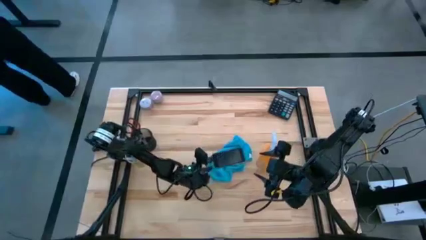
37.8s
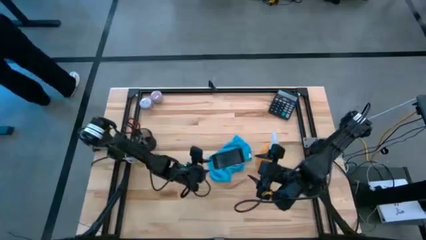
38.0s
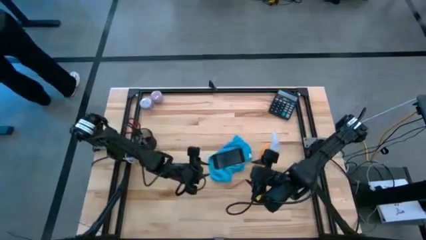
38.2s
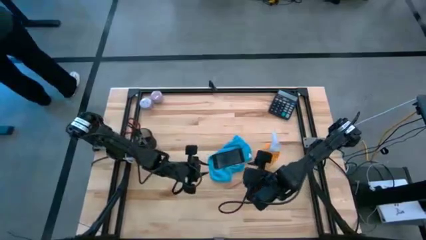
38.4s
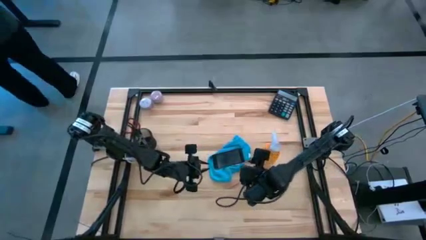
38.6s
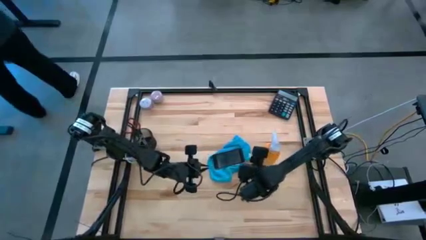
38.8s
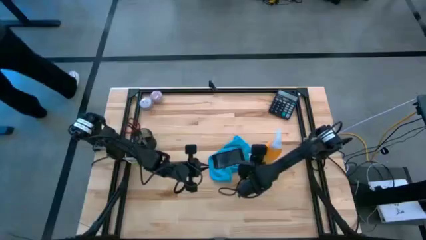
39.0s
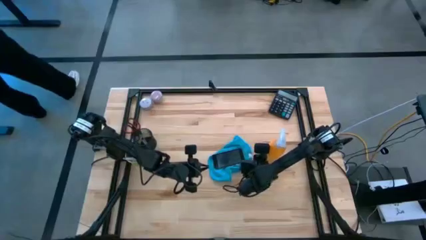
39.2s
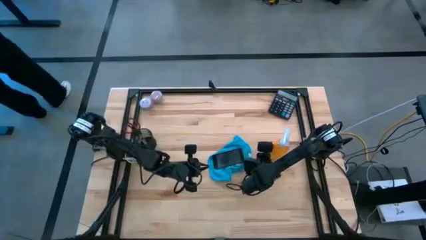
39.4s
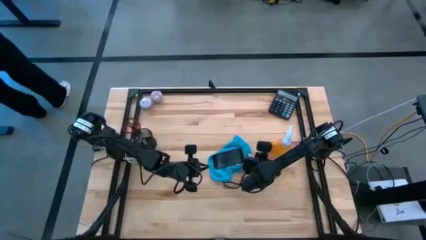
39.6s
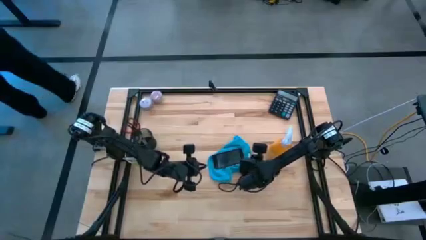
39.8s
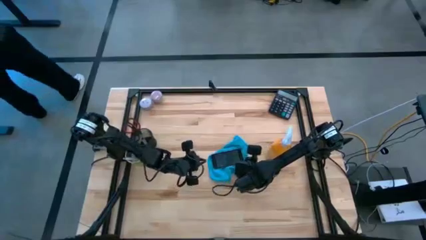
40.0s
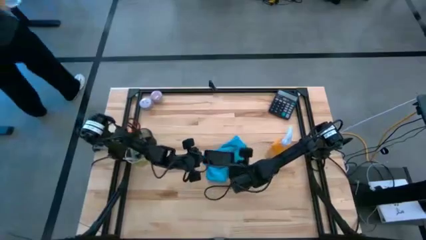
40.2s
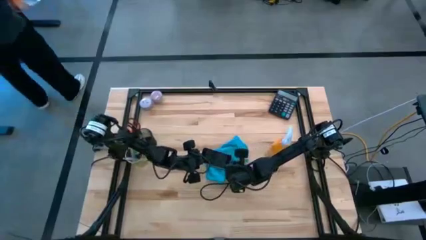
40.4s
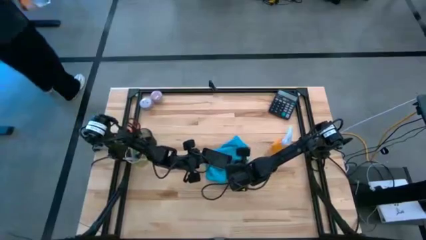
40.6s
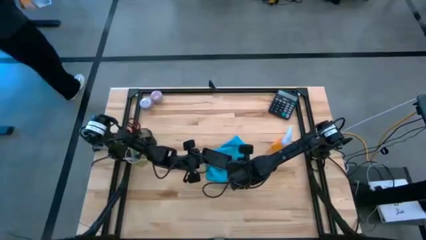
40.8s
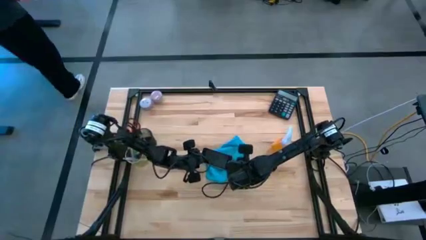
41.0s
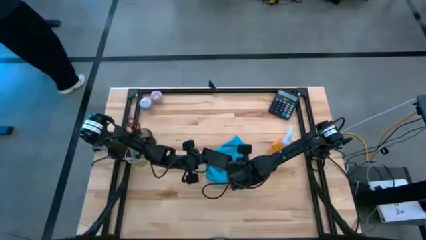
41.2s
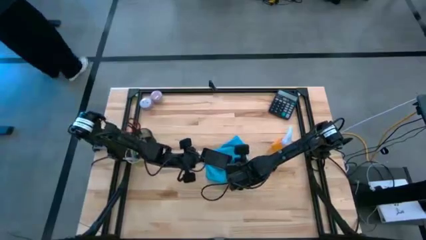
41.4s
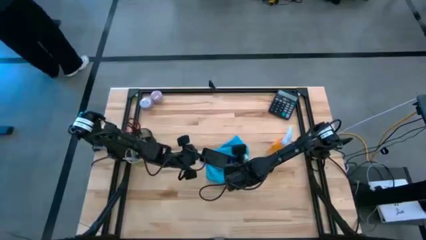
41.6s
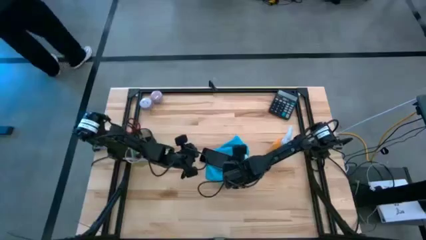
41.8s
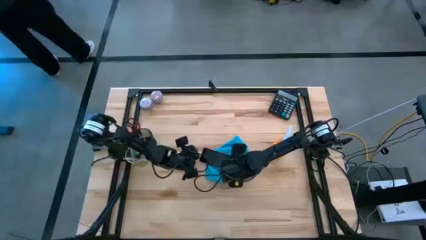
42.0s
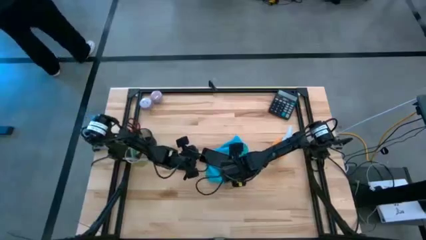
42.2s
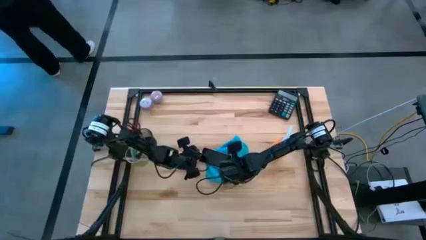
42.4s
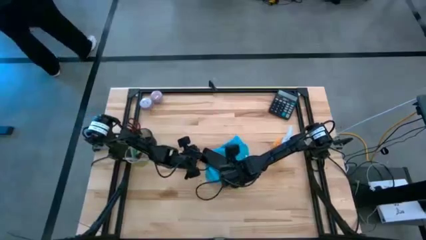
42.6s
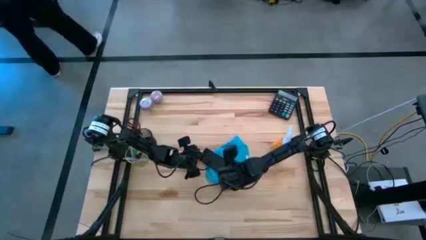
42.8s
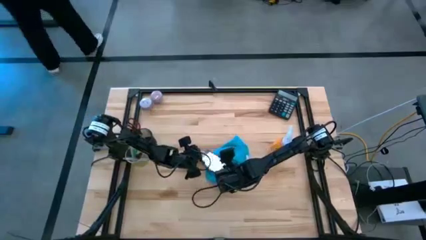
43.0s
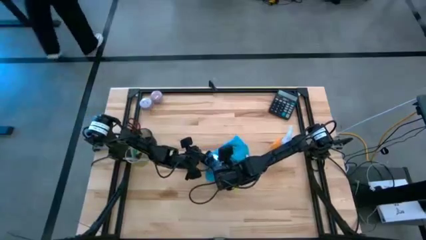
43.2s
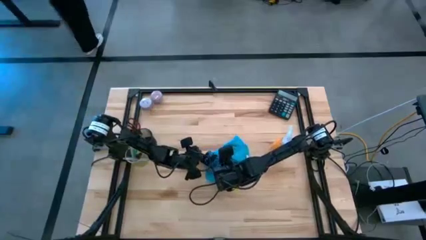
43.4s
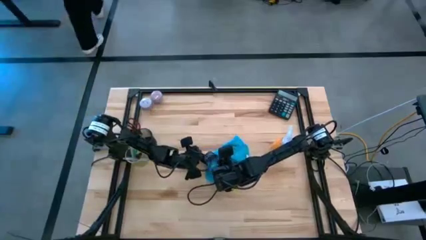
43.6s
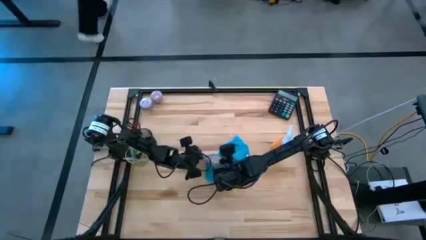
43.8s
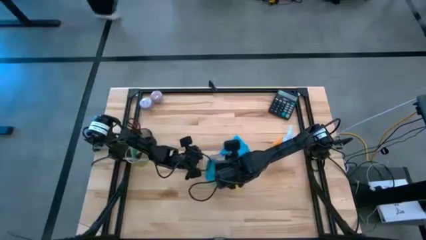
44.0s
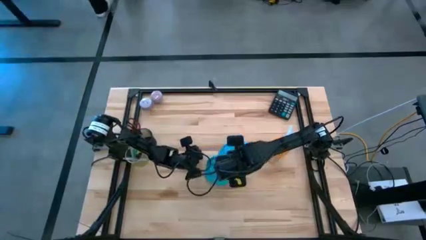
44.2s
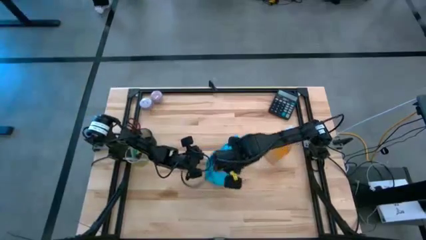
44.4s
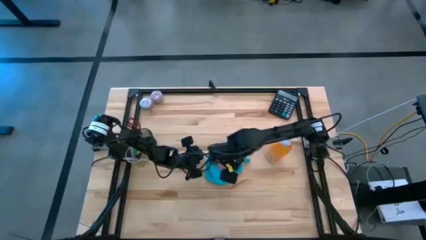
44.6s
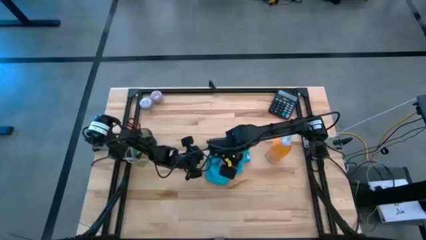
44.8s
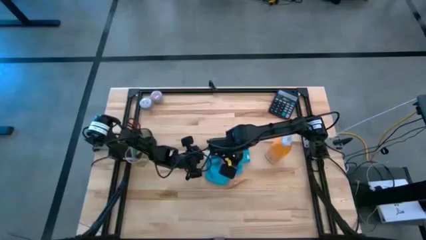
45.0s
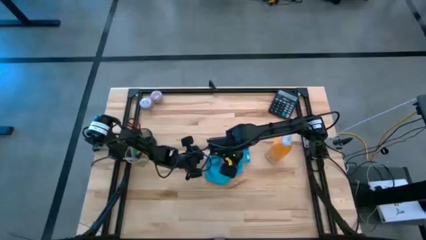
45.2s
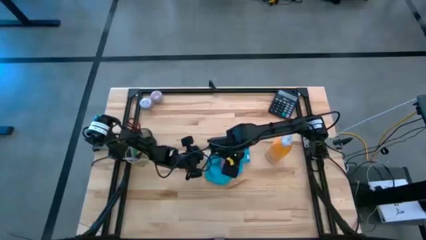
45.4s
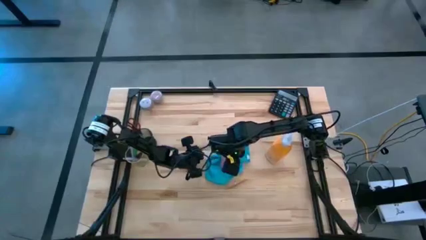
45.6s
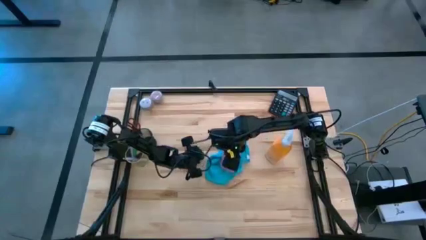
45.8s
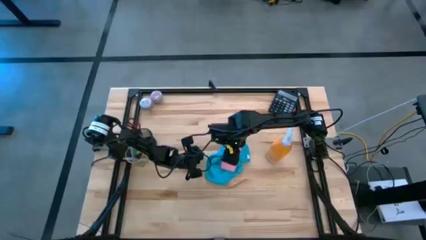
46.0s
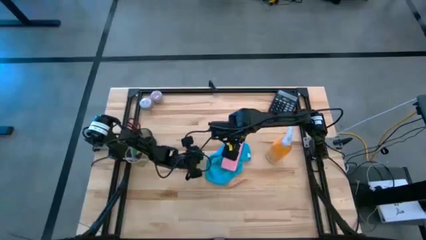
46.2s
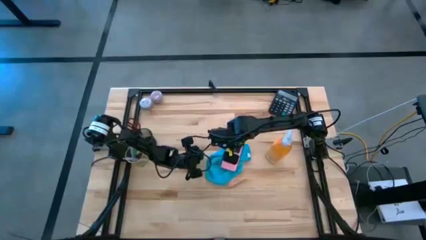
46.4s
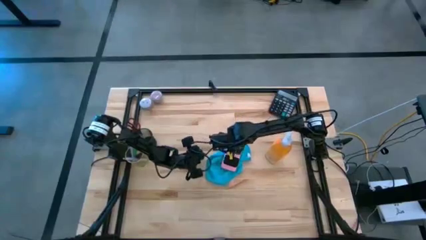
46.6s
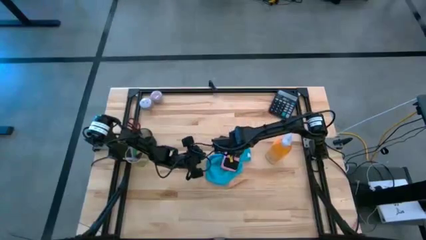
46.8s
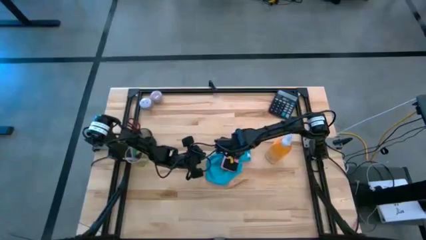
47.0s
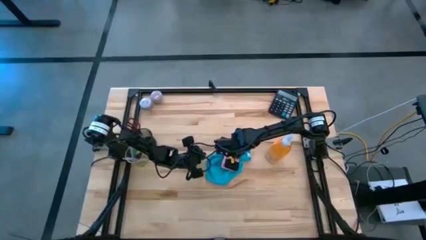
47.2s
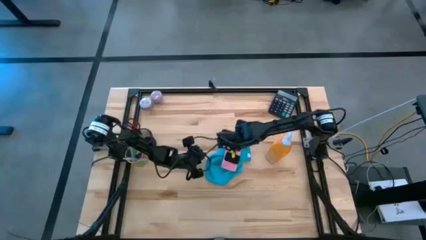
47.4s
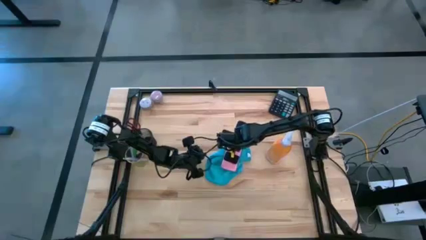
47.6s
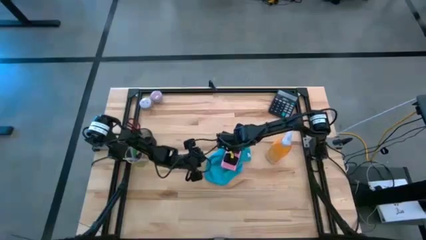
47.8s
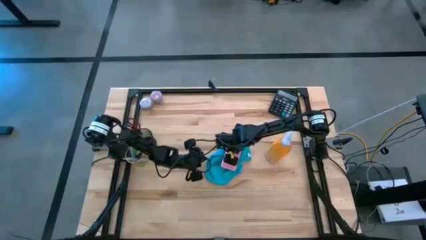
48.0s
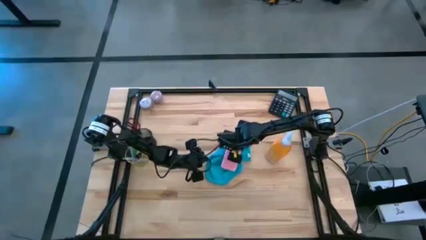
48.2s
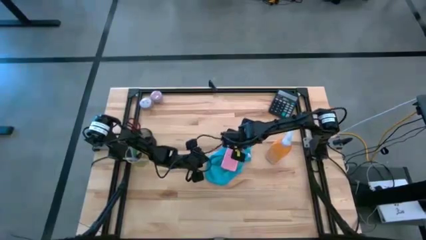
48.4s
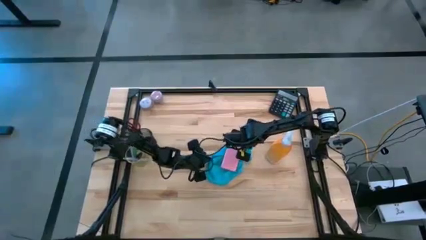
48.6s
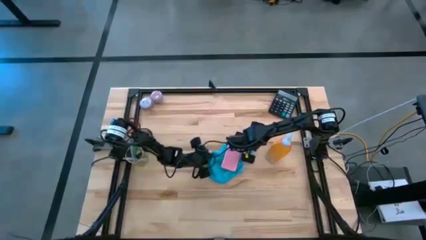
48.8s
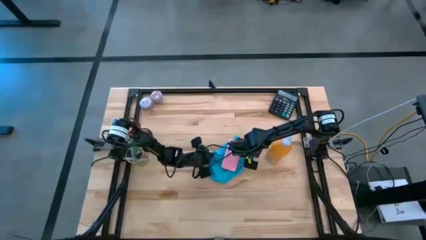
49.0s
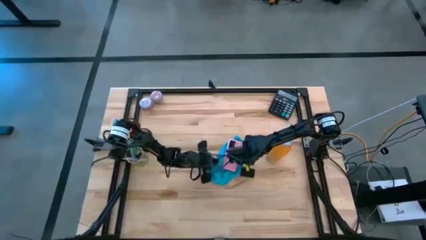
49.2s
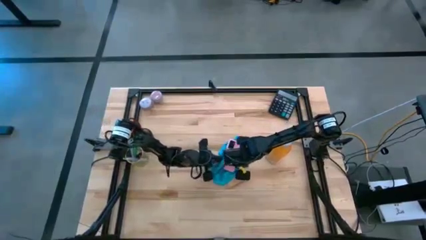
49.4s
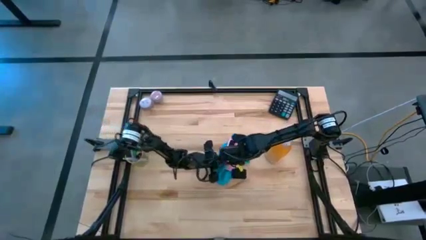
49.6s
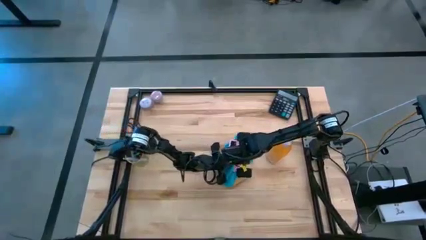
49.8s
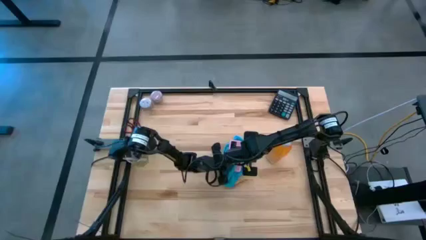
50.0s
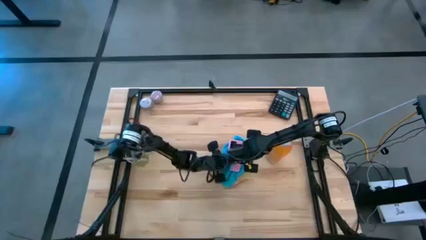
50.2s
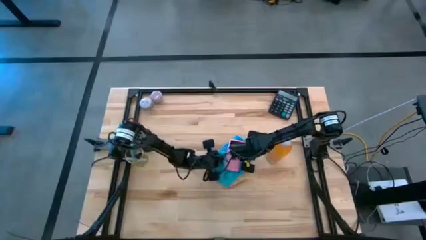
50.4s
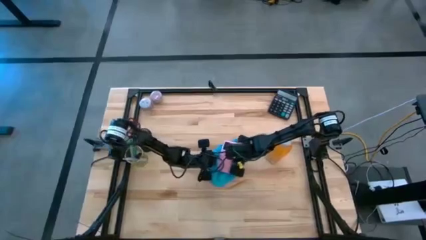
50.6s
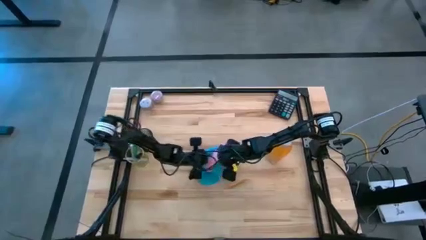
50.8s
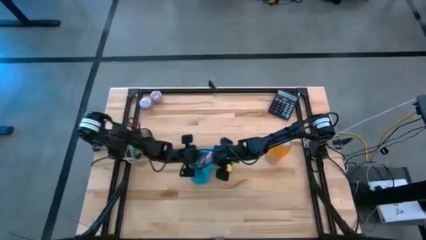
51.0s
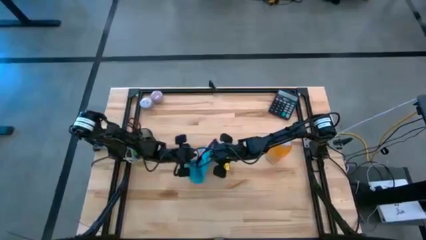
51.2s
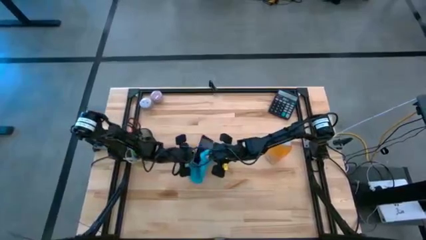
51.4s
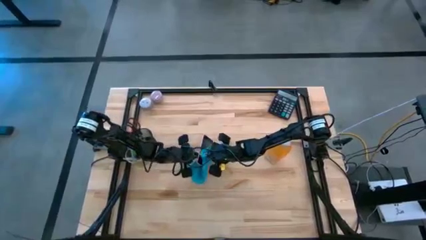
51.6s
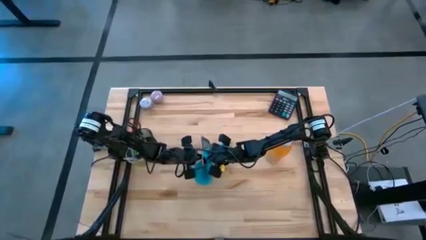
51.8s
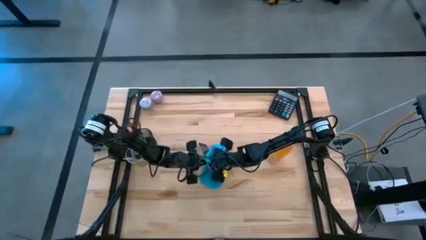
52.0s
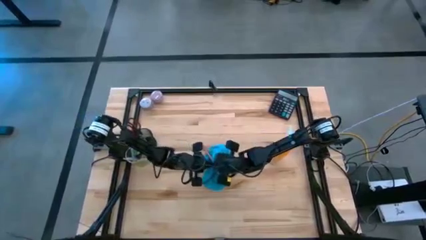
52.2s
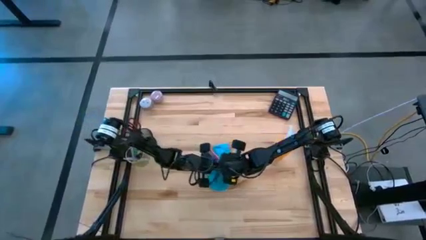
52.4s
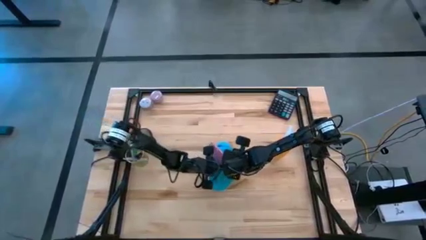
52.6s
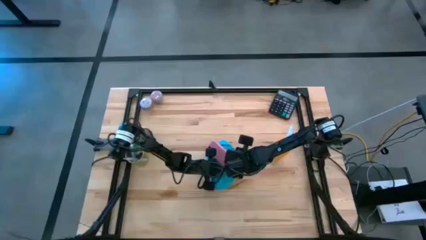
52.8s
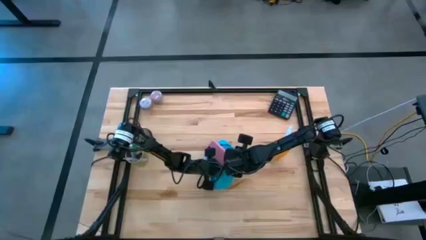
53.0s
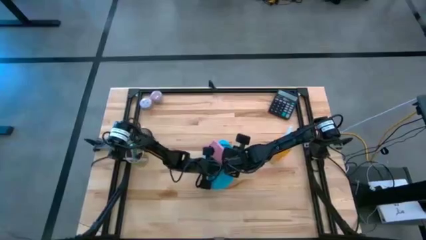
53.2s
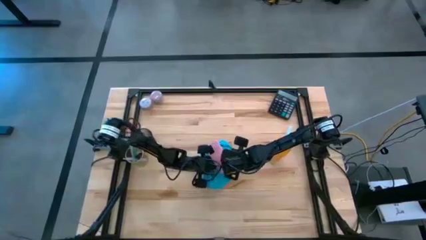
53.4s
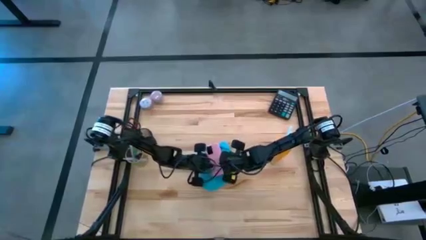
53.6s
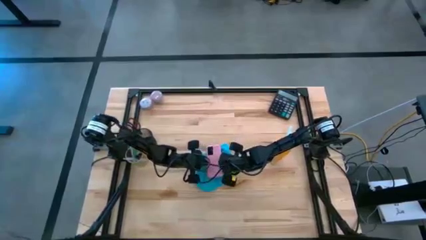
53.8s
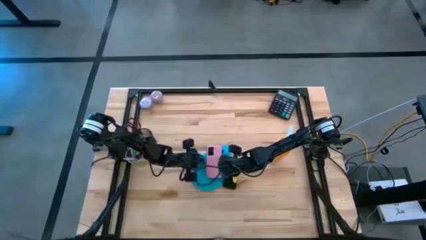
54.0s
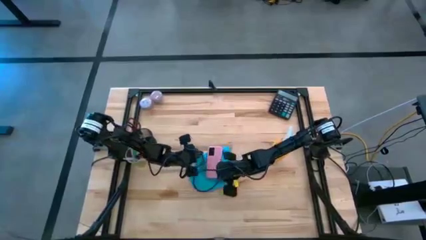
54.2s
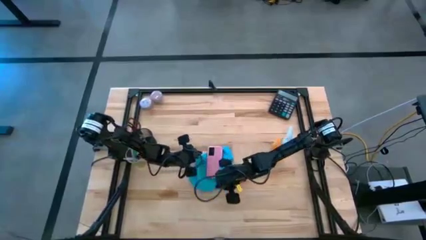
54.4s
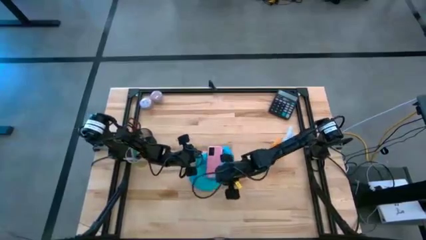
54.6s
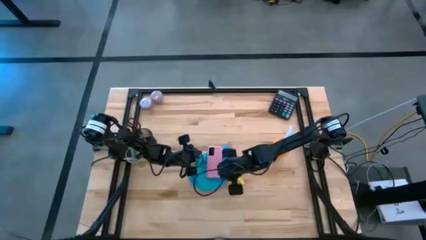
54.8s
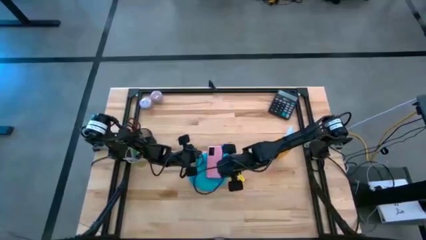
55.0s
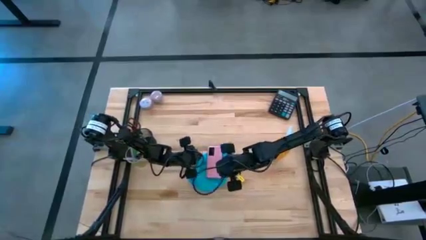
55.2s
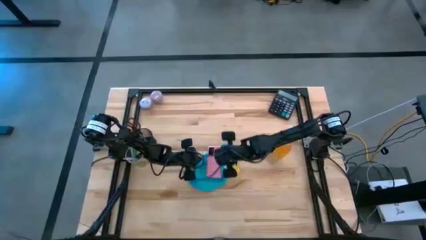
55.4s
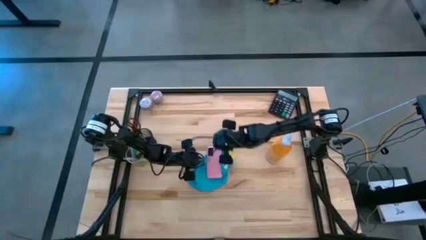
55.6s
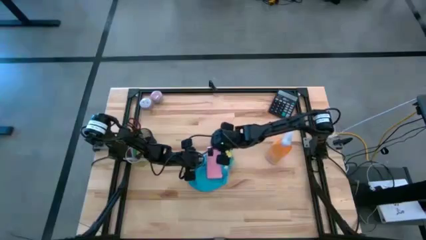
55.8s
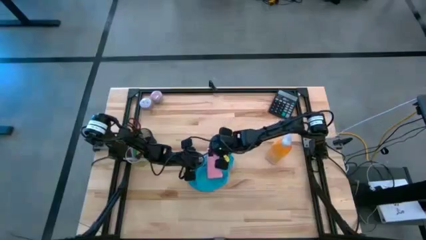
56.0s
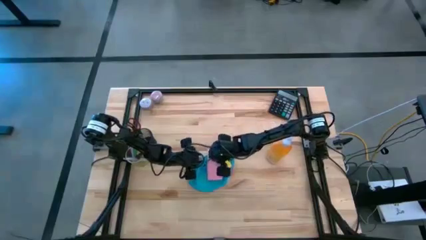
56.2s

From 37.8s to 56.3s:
Task: Apply microfiber cloth
Wipe the pink cellphone with the blue microfiber cloth
